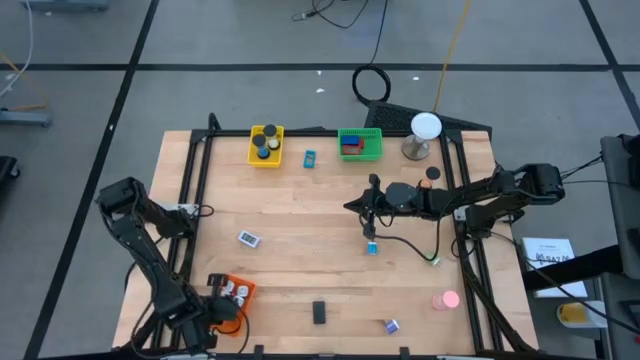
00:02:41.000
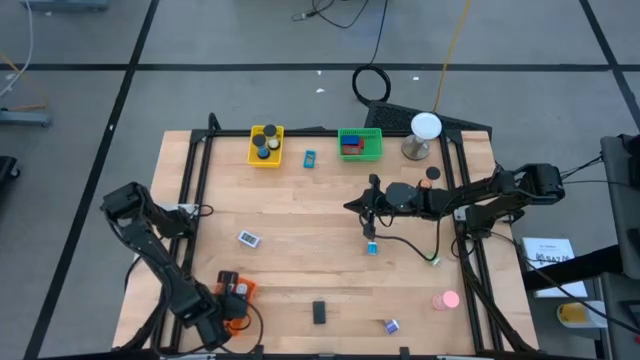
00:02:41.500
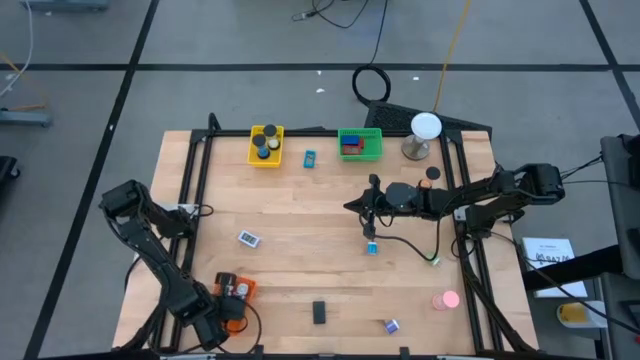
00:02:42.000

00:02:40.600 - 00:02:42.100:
Task: Pick & Place Office items
Adjust the green charger adapter in the orange bin

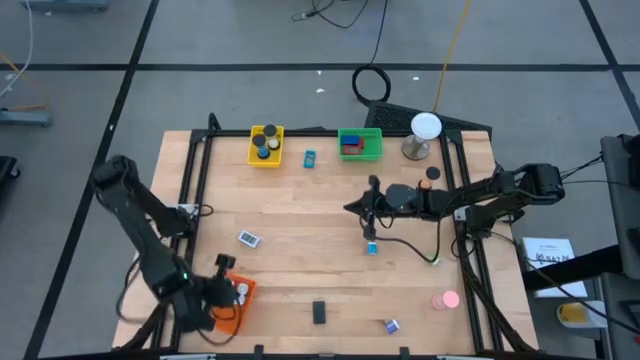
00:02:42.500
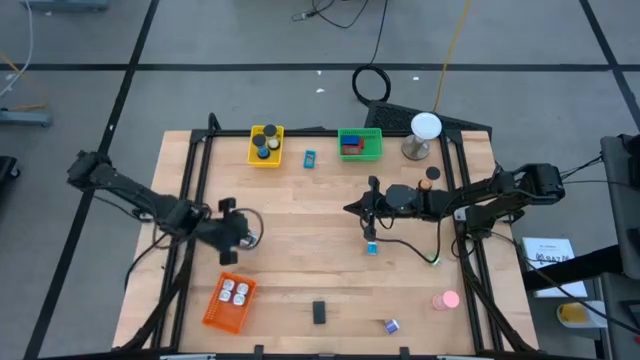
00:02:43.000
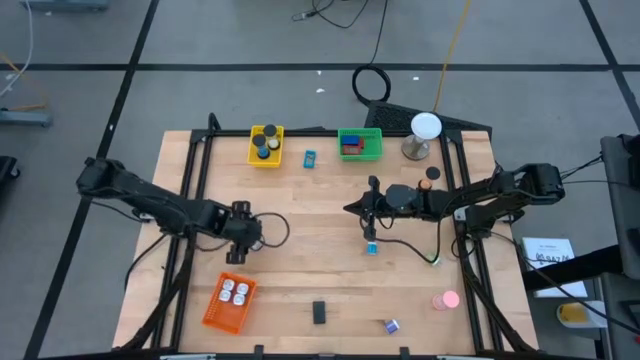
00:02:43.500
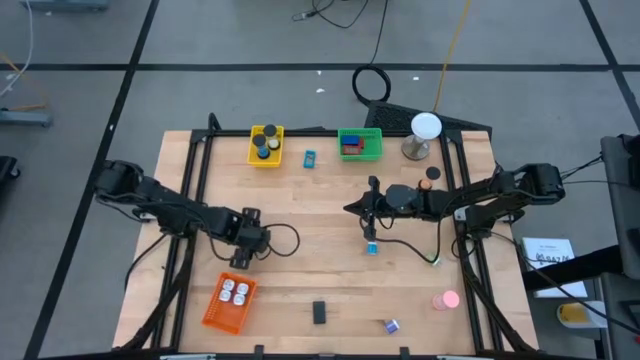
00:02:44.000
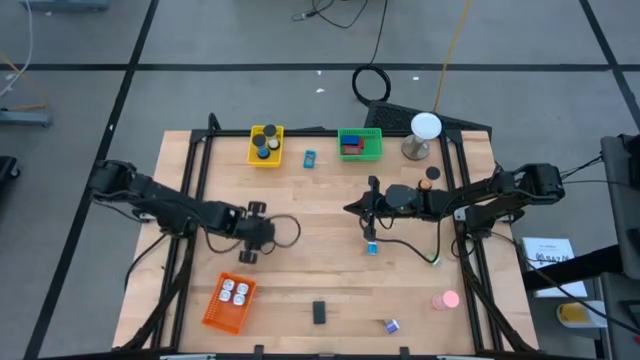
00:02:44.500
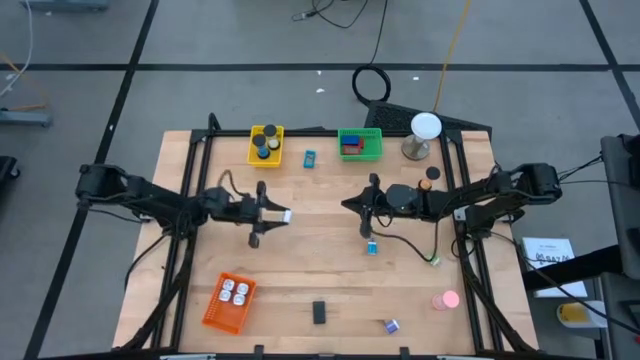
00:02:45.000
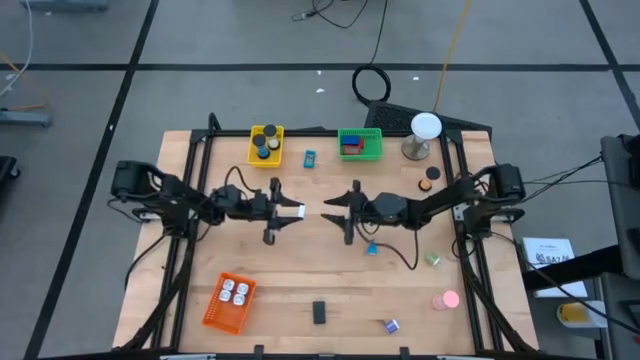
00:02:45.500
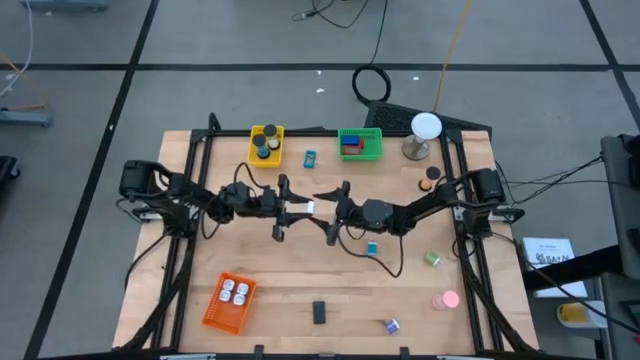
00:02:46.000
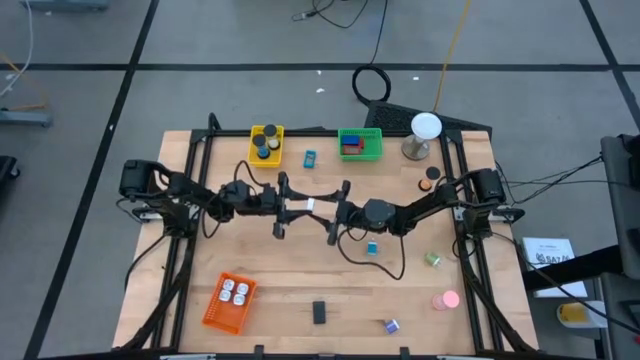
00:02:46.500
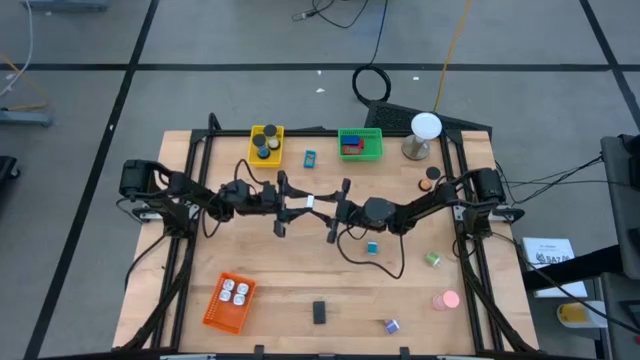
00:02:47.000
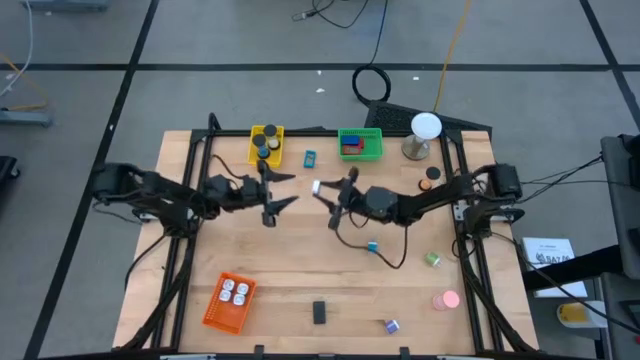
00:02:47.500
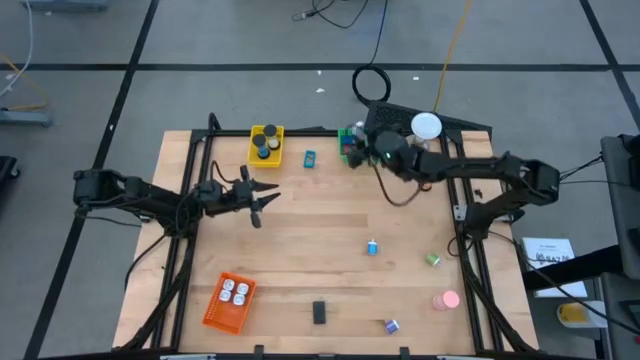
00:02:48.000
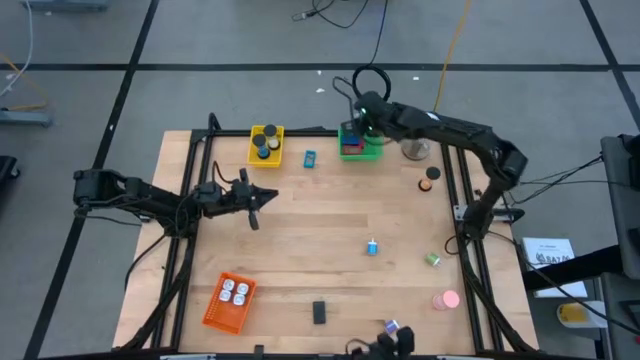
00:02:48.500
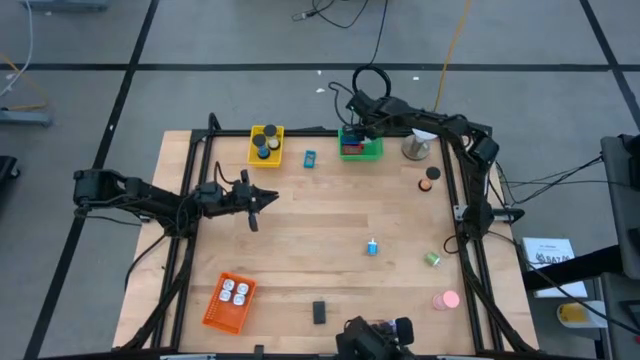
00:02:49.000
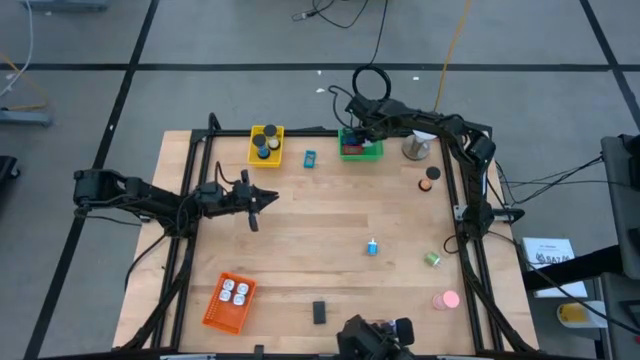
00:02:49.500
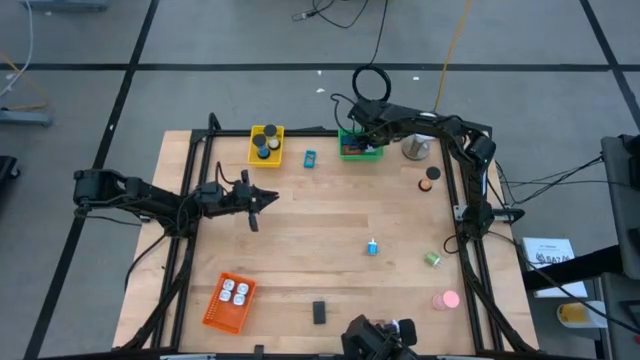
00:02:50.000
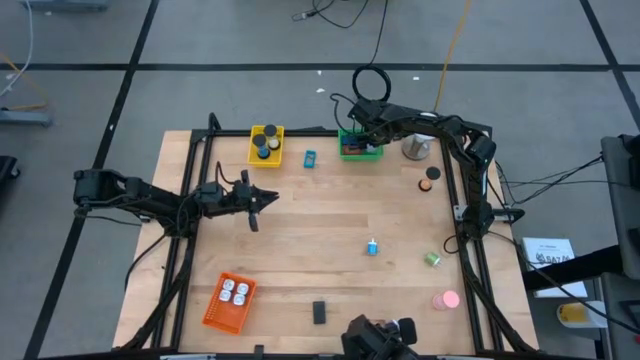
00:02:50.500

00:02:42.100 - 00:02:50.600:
Put the white digital clock into the green bin

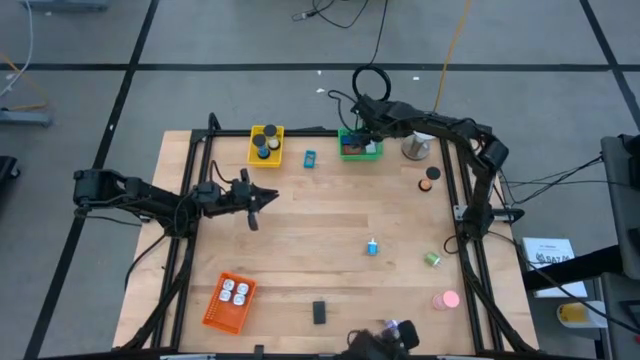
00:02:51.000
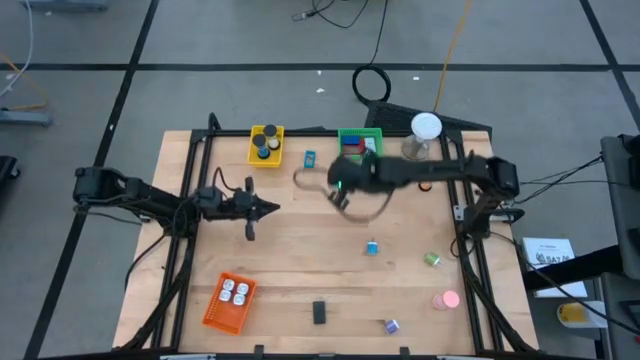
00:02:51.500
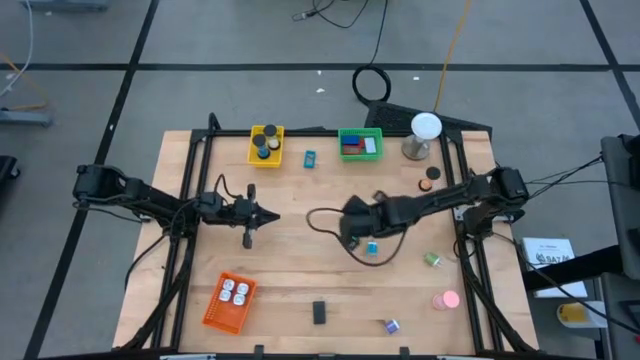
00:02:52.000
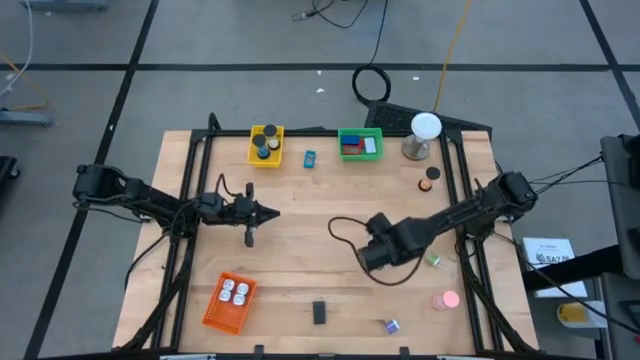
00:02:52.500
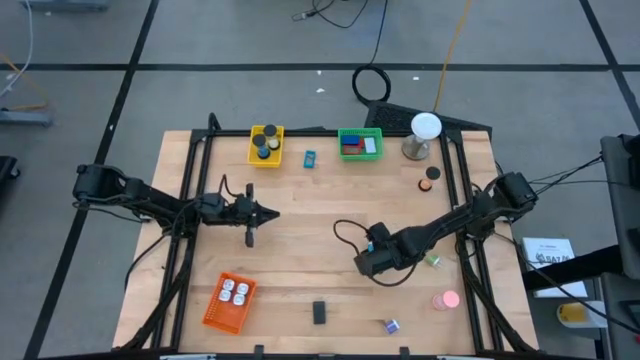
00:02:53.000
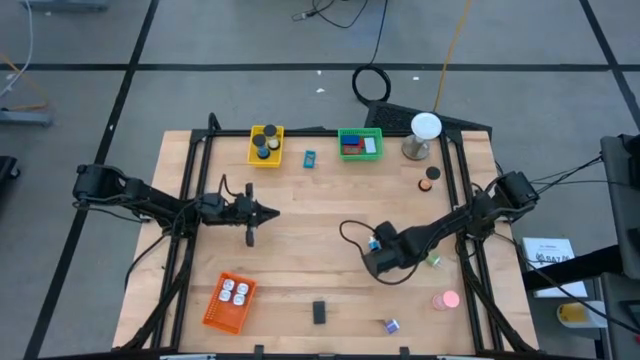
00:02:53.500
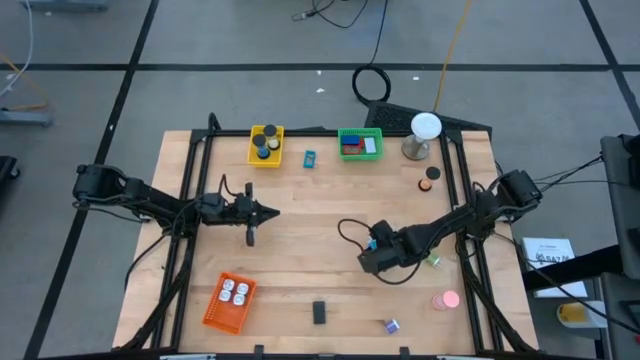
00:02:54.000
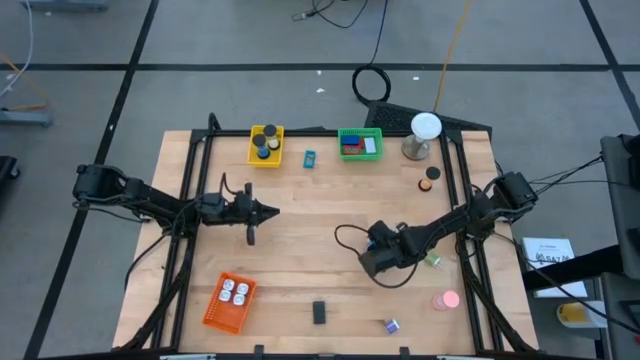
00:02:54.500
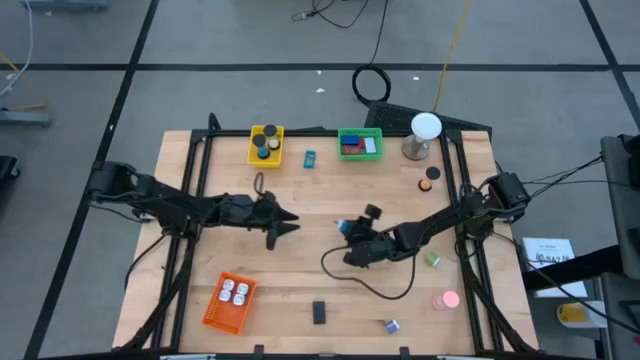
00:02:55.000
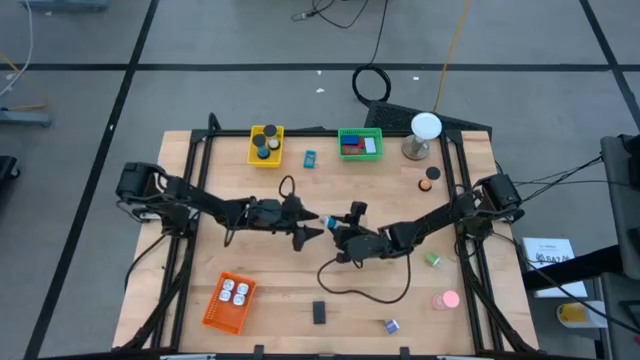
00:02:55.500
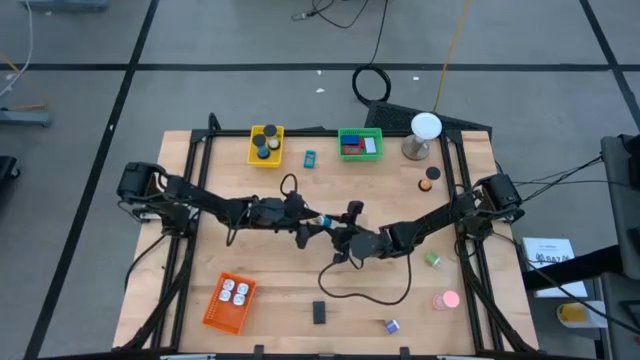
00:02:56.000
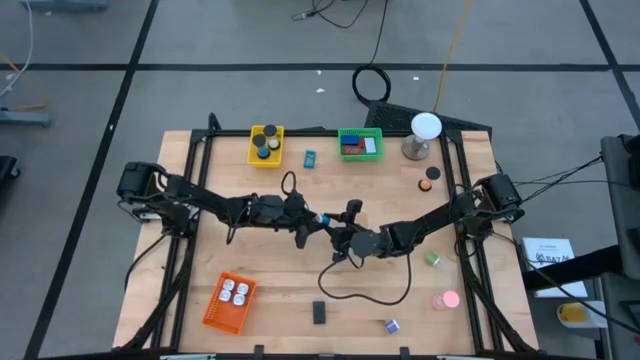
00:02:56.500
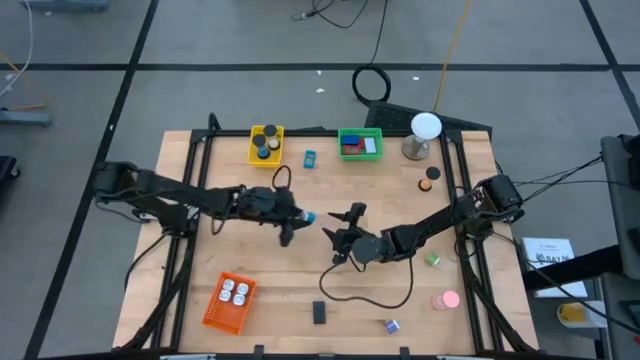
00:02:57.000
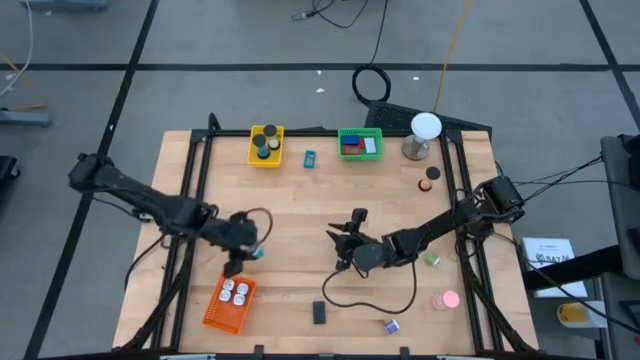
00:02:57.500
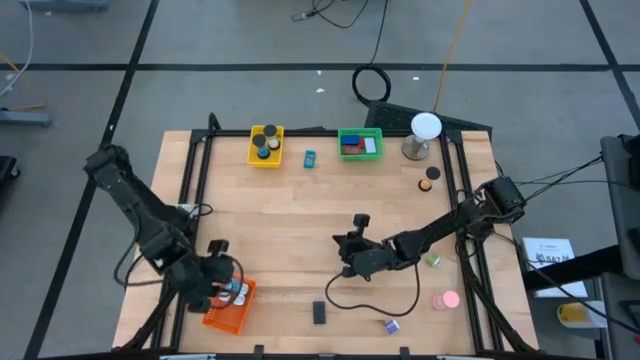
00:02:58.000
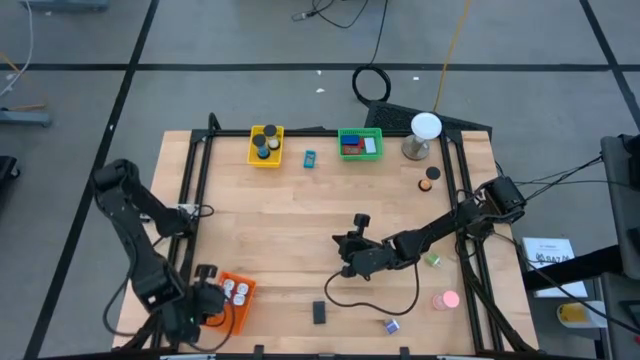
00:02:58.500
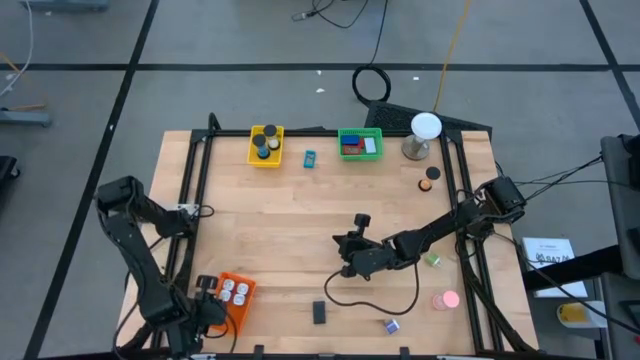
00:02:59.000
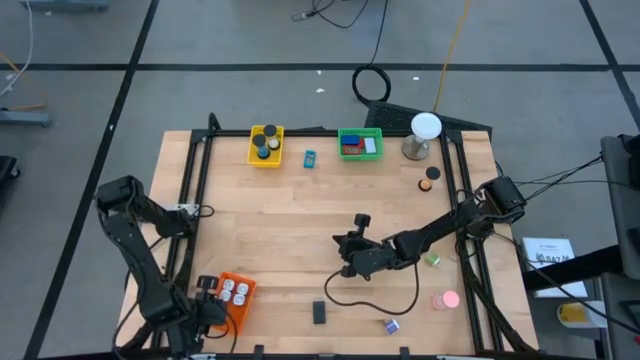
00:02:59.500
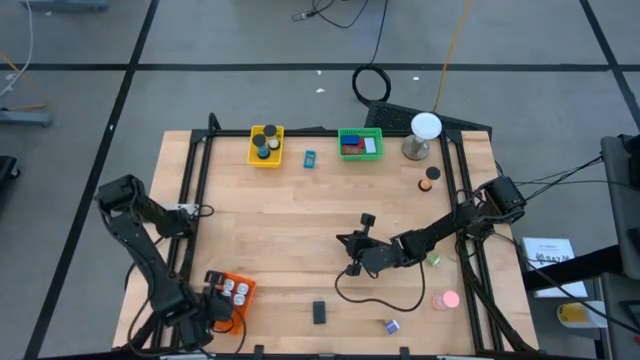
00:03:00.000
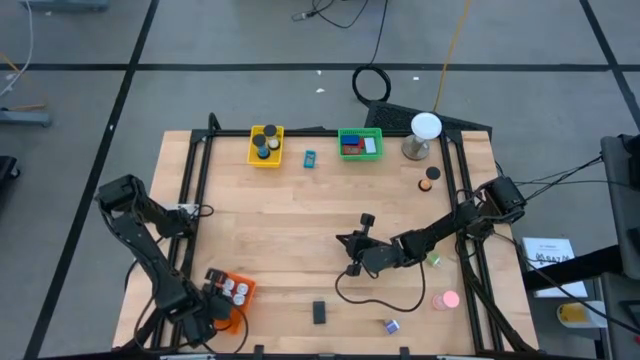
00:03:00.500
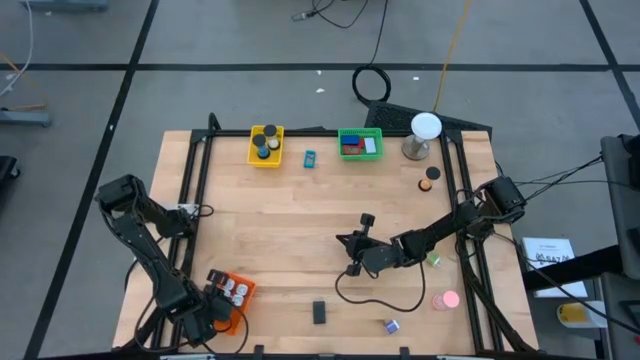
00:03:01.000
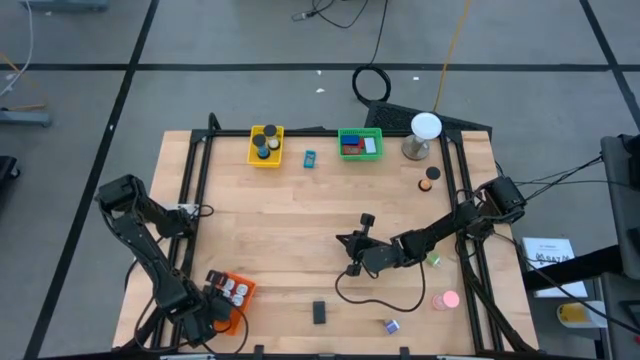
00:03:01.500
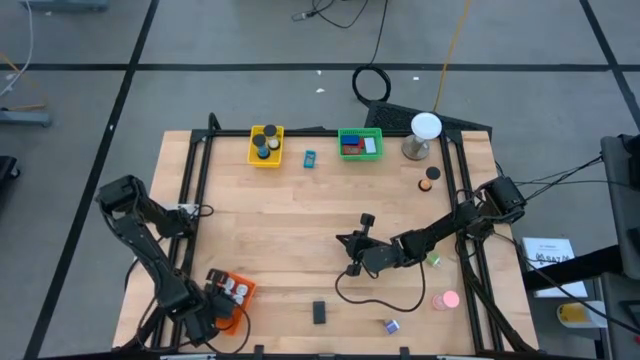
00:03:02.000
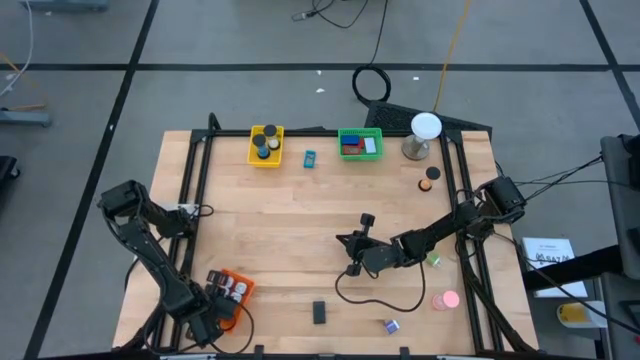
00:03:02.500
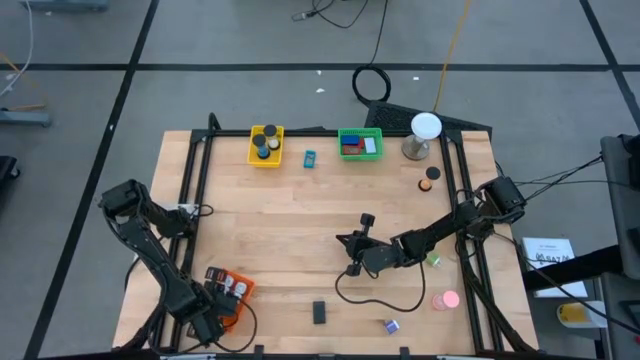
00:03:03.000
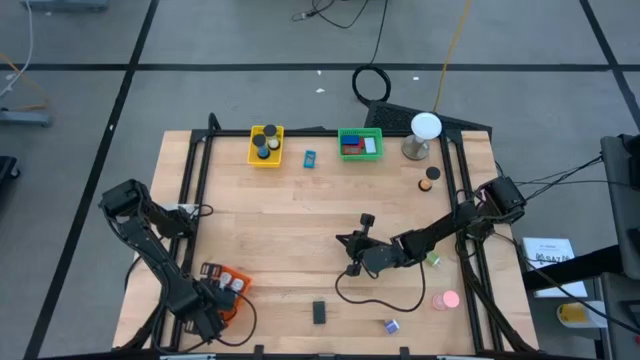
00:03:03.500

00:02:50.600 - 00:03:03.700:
Put the blue charger adapter into the orange bin
